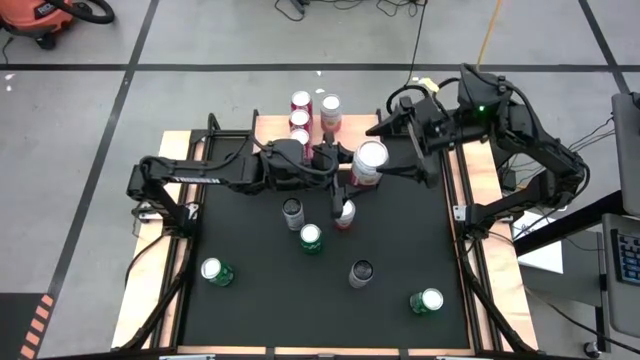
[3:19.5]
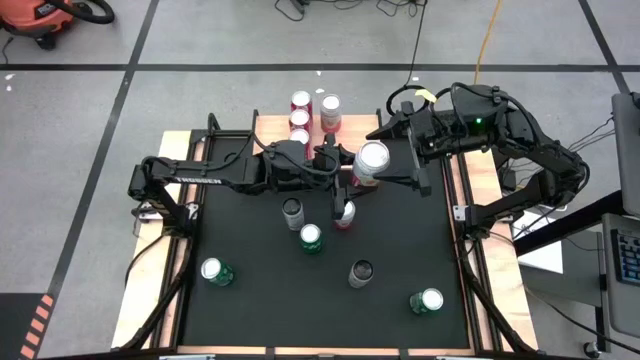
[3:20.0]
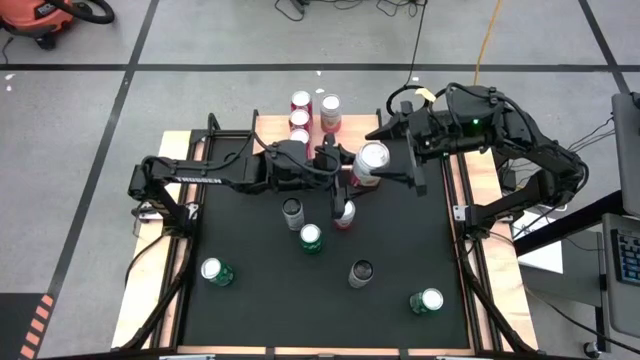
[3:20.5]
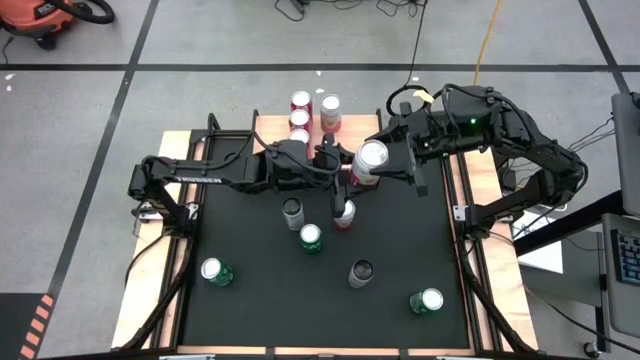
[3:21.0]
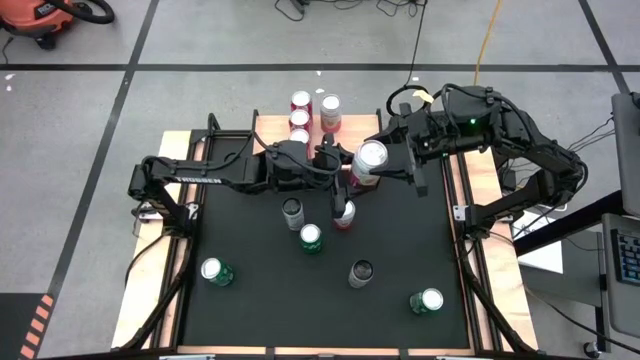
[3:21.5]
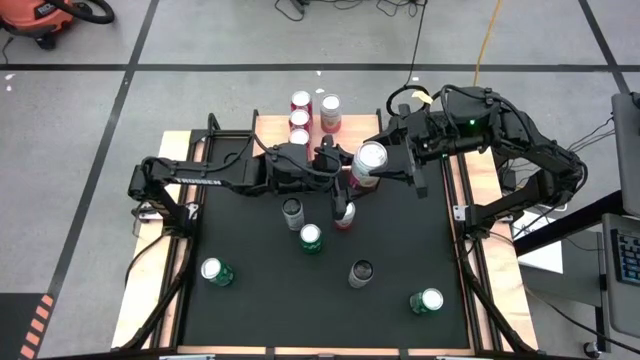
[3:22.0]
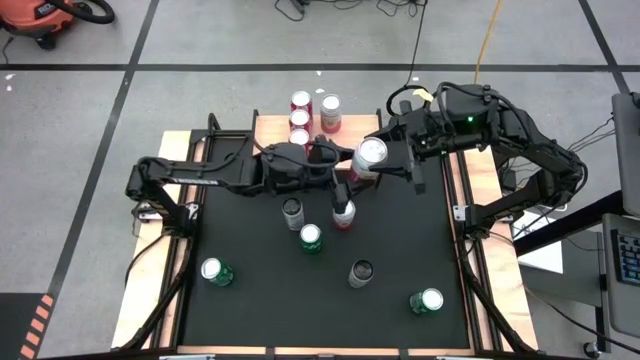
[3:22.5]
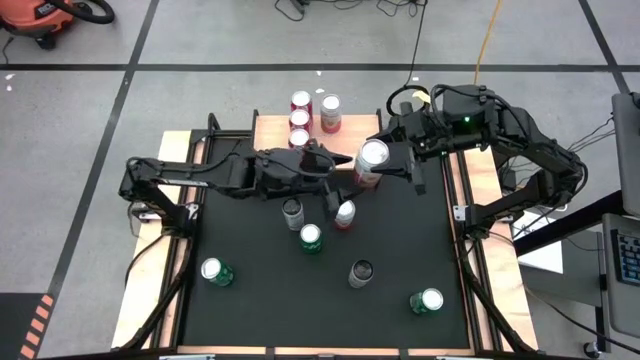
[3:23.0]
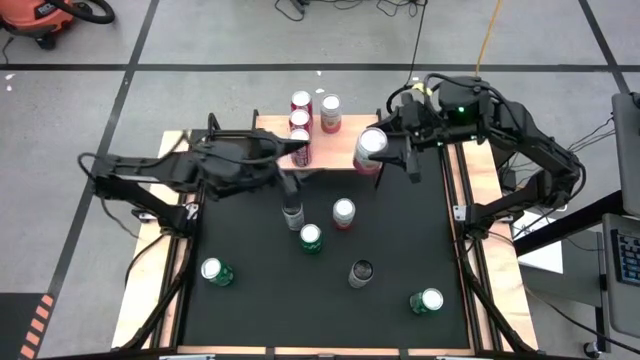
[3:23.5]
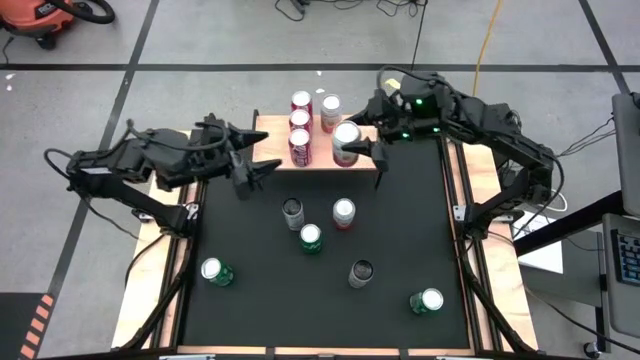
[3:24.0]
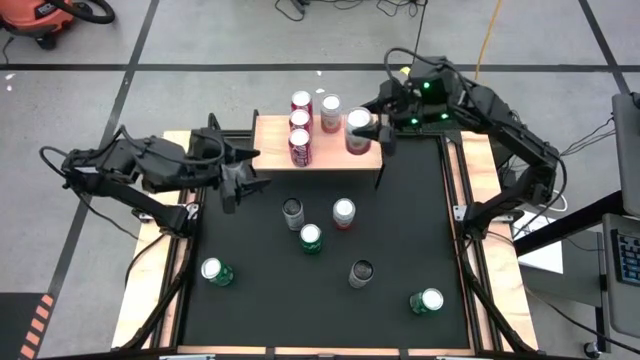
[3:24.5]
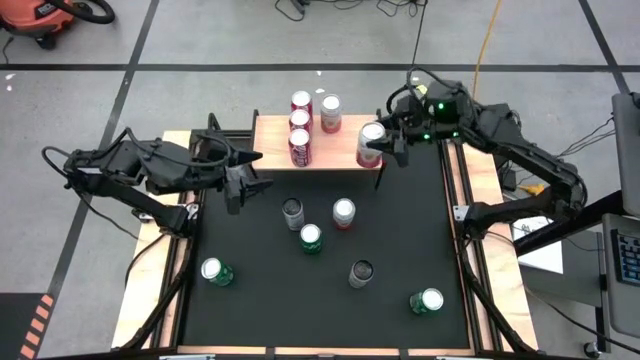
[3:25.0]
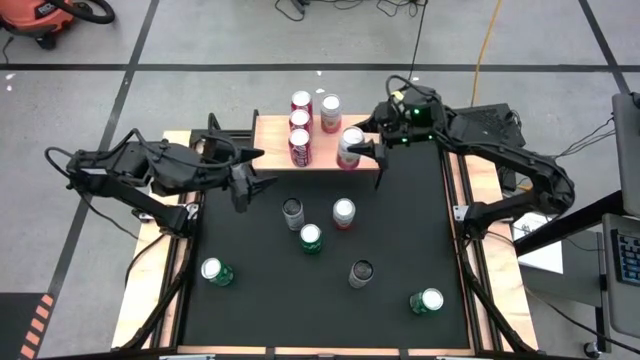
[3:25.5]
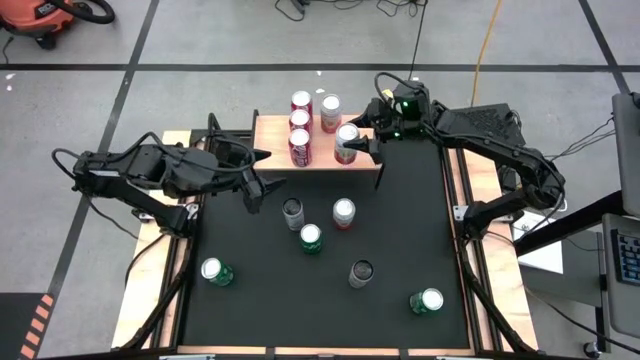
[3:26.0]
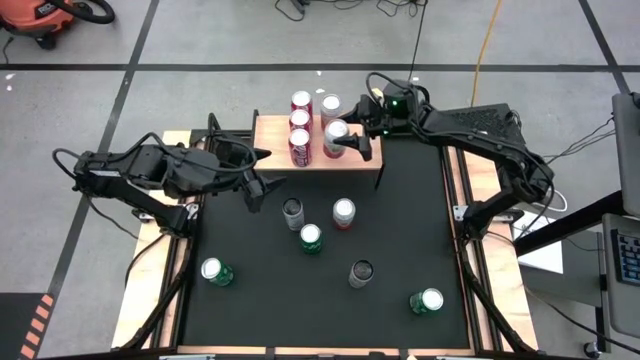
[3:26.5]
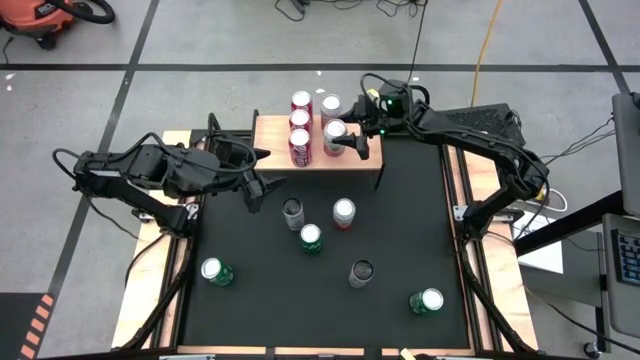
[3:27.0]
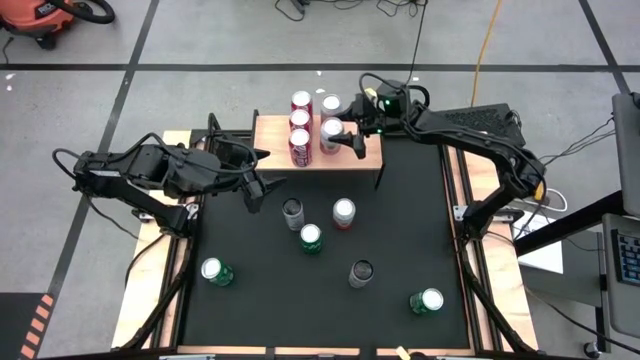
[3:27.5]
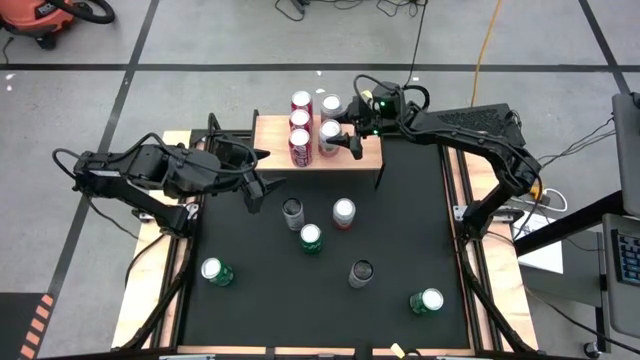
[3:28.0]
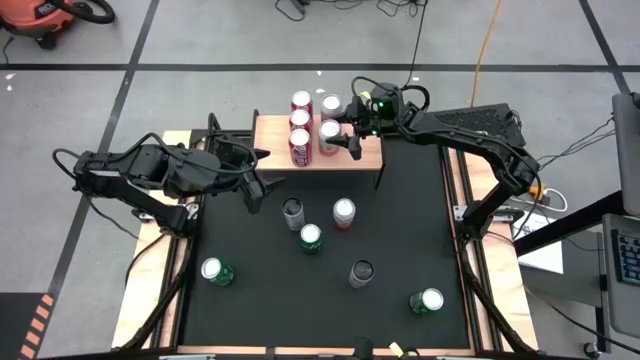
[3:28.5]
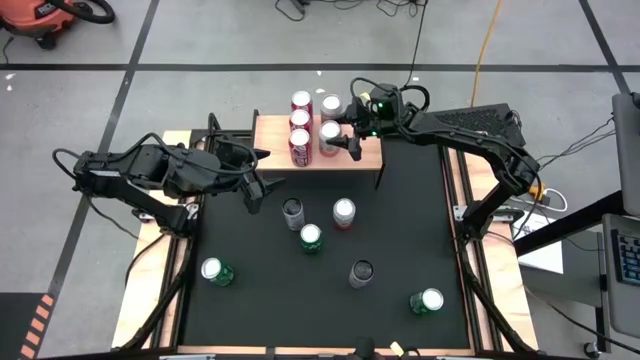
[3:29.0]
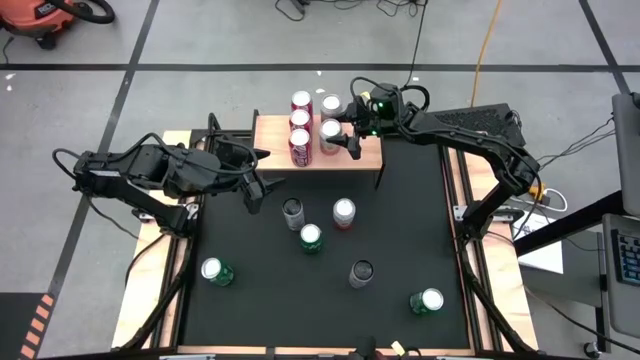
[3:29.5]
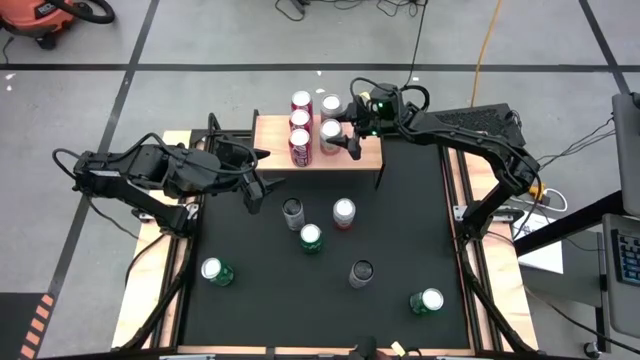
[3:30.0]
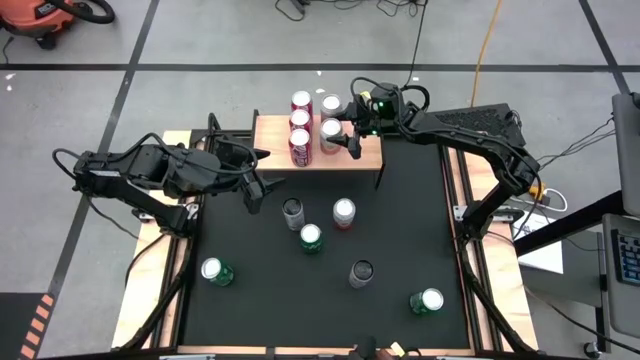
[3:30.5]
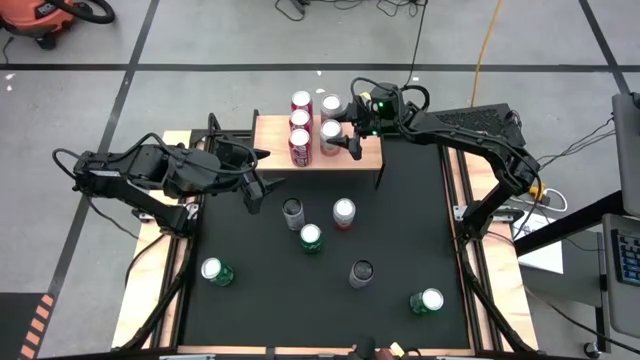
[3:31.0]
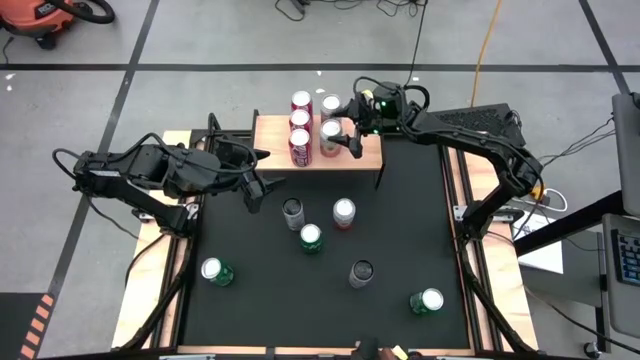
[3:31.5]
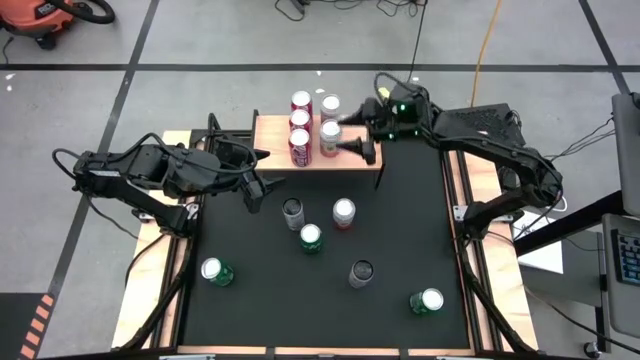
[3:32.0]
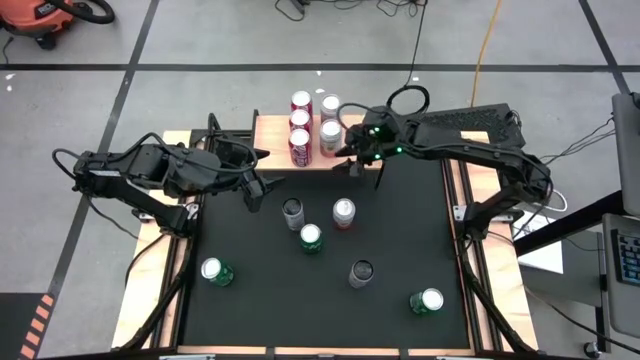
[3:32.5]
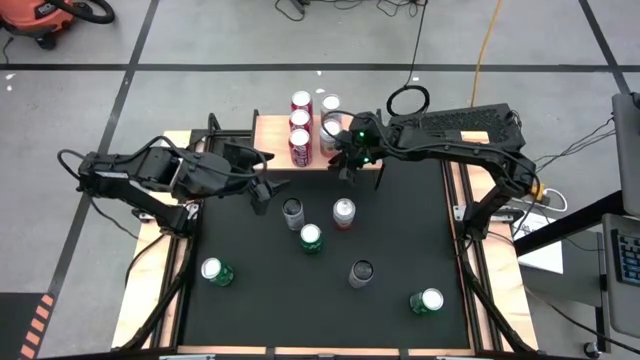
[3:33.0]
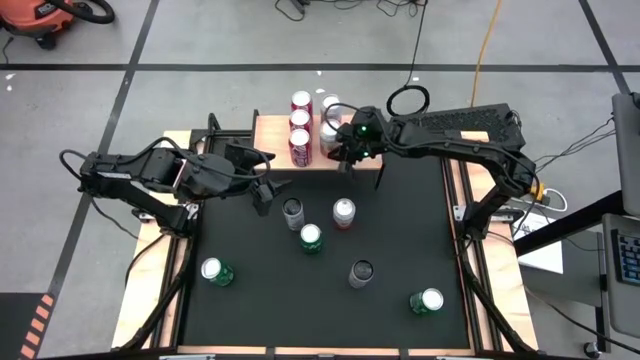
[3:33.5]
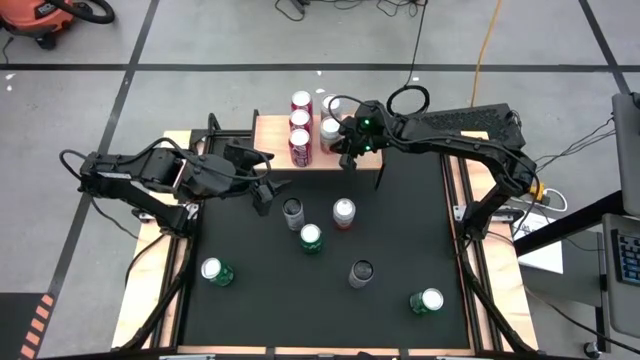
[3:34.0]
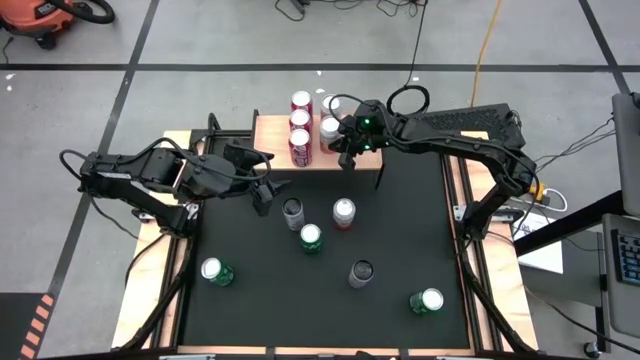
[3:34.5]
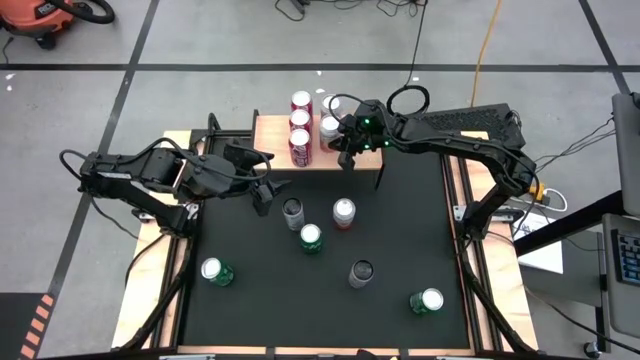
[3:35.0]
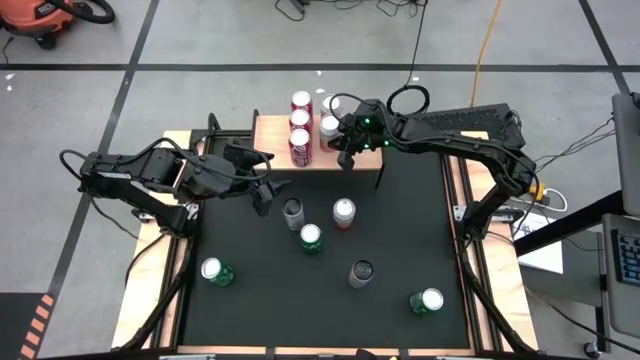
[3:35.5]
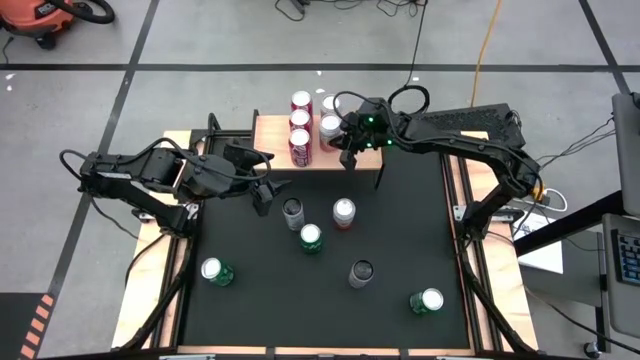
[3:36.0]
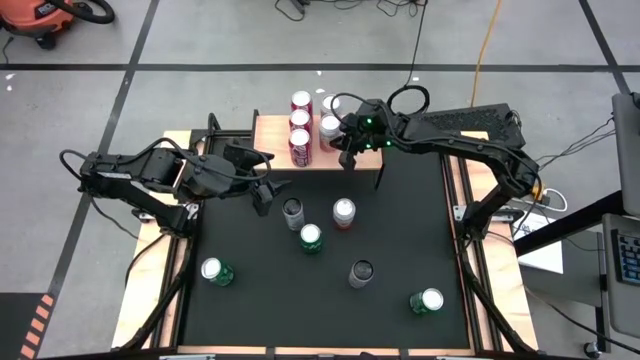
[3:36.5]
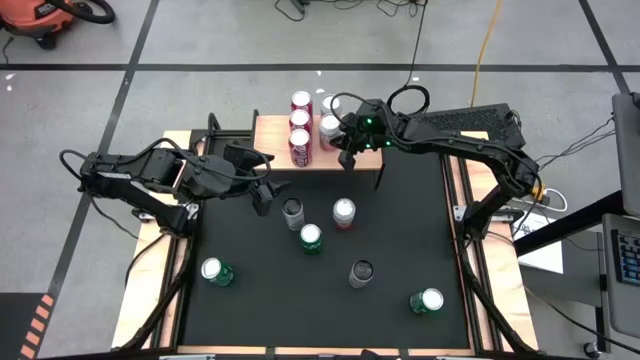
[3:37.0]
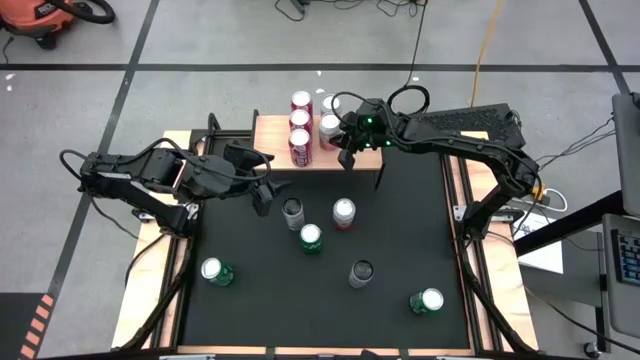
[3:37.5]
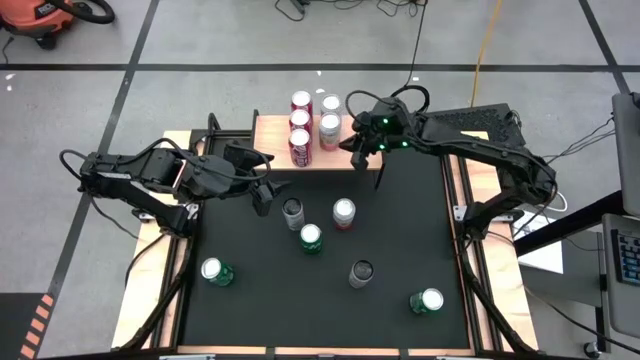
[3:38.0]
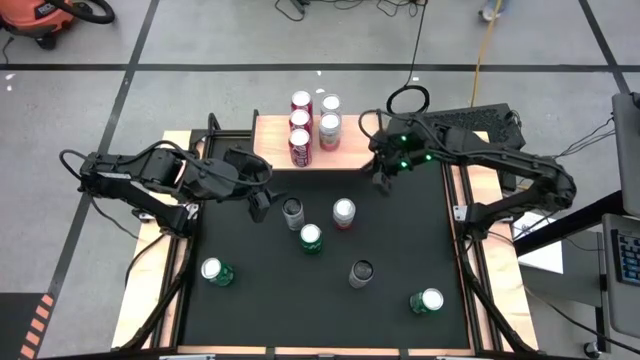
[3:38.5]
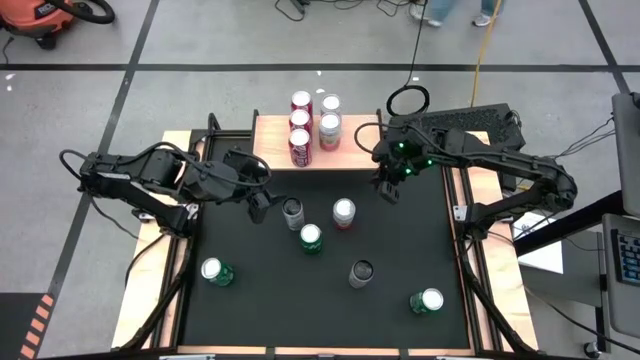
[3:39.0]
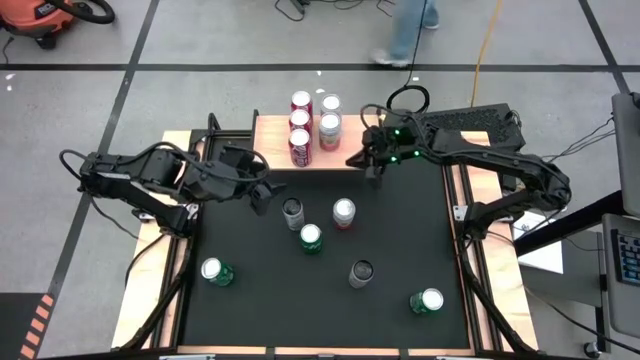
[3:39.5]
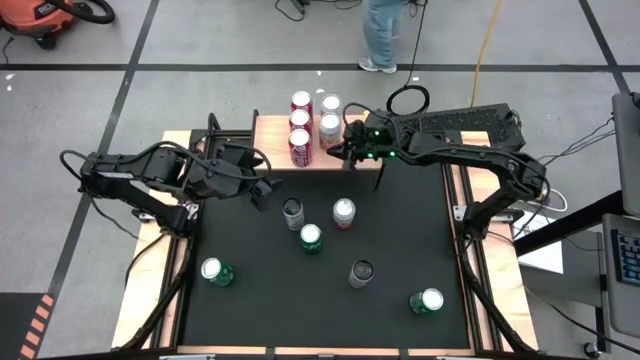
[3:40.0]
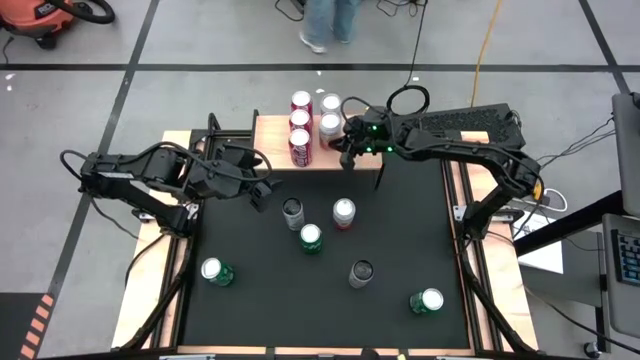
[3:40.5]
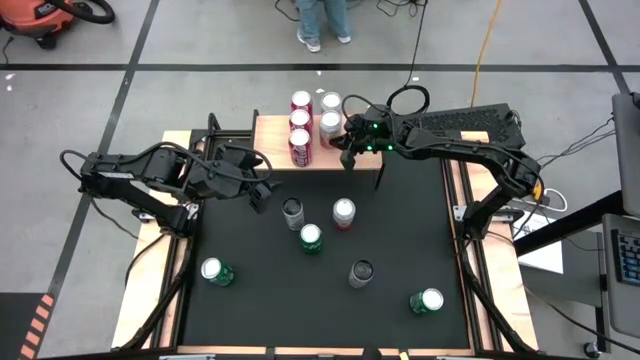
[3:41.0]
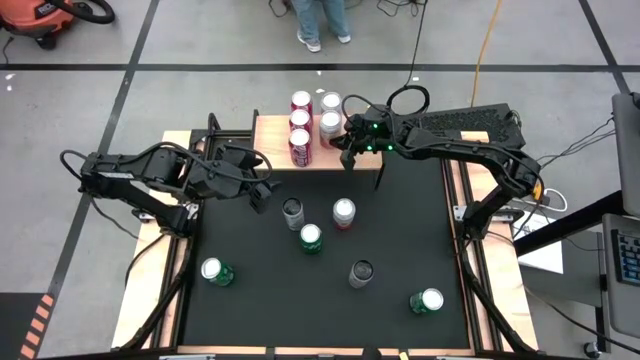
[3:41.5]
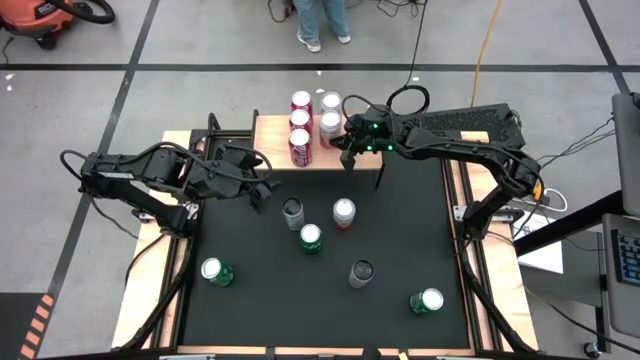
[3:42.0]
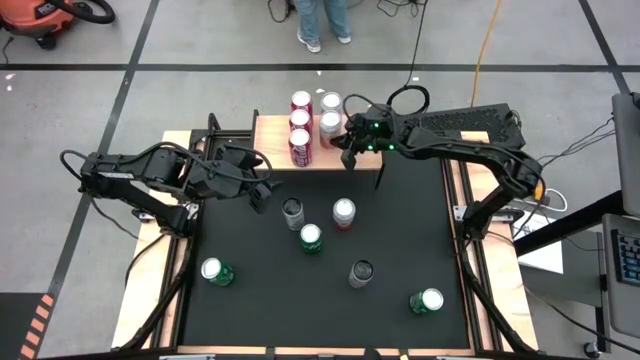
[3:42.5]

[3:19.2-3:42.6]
Task: Place canned beverage on shelf
Put the top white pink soda can on the shelf aligned with the other white pink soda can
